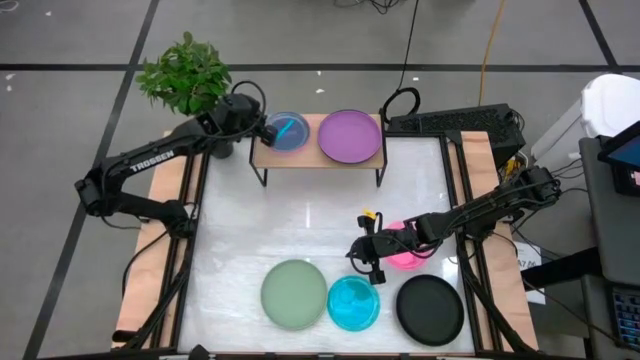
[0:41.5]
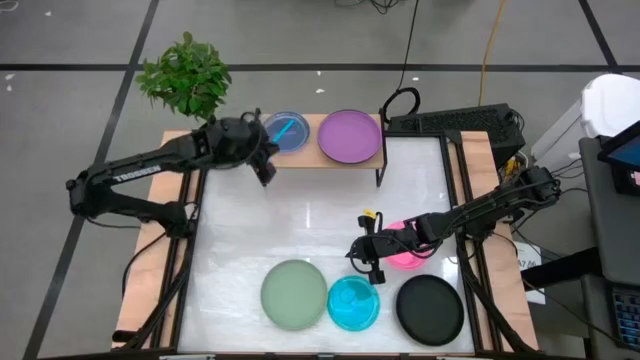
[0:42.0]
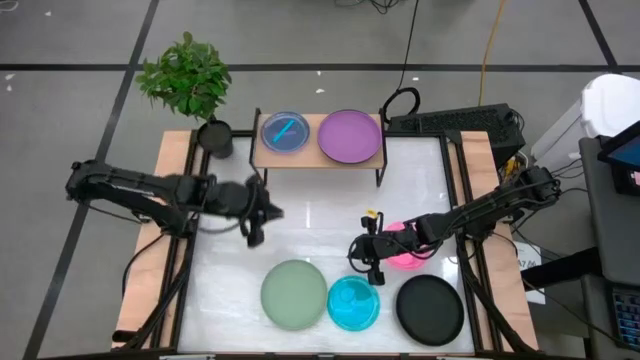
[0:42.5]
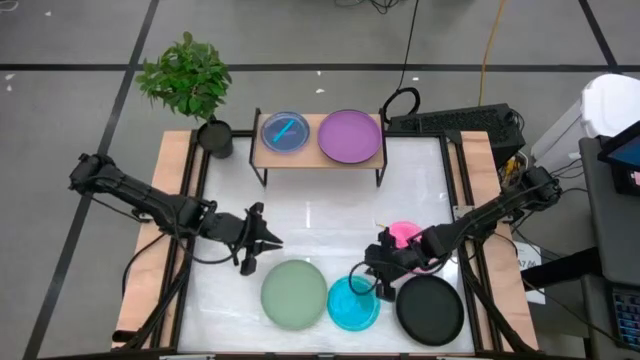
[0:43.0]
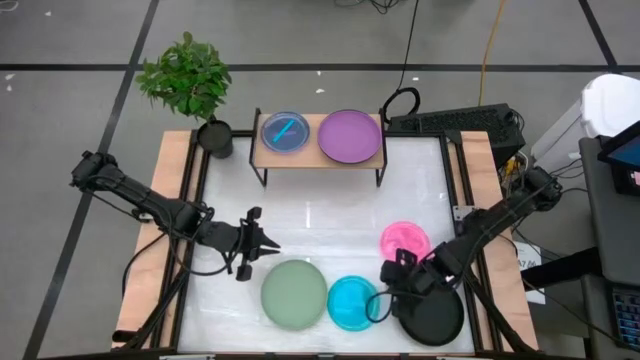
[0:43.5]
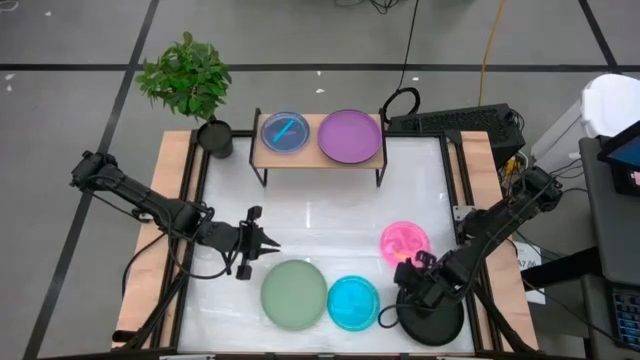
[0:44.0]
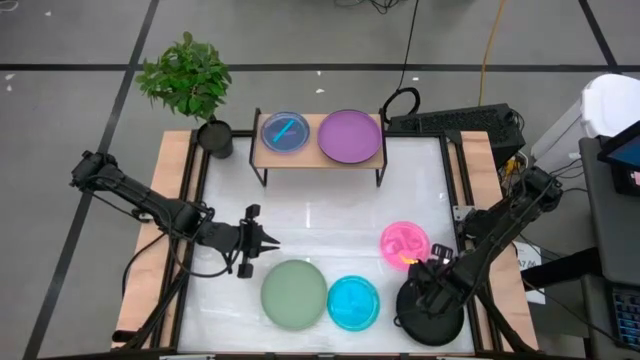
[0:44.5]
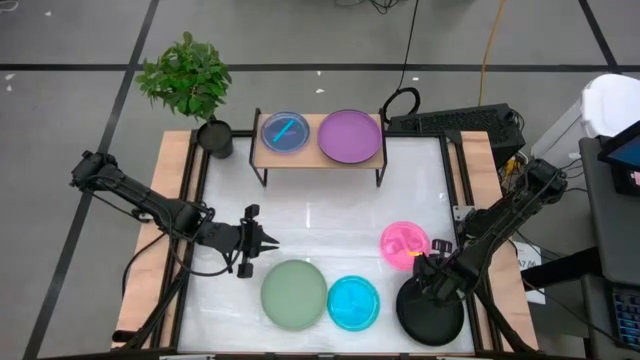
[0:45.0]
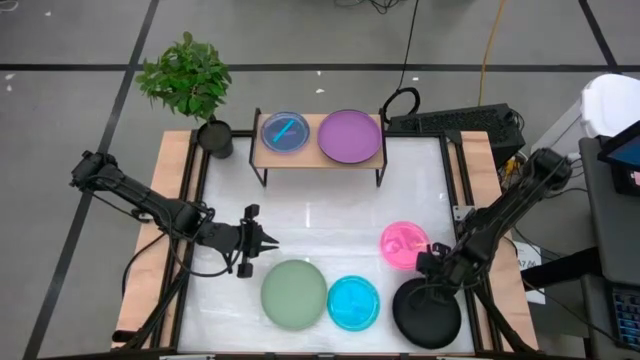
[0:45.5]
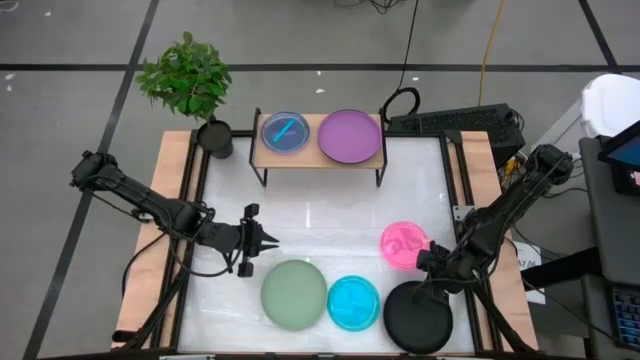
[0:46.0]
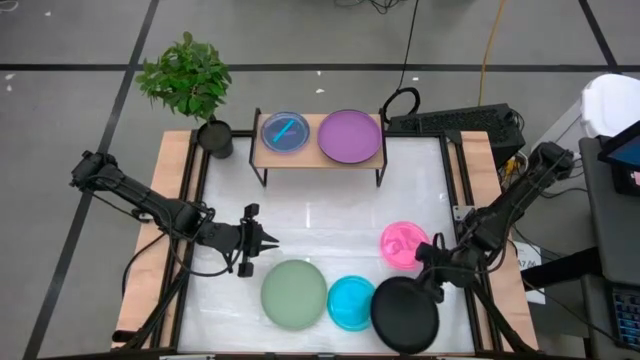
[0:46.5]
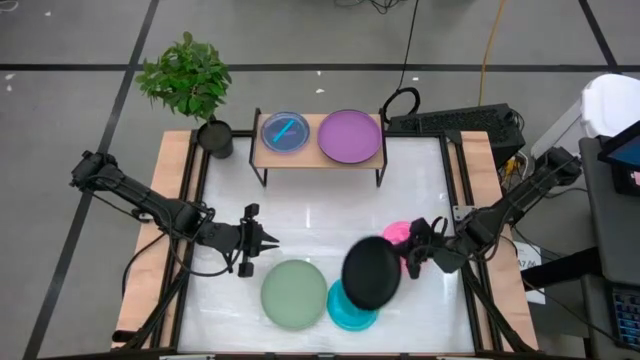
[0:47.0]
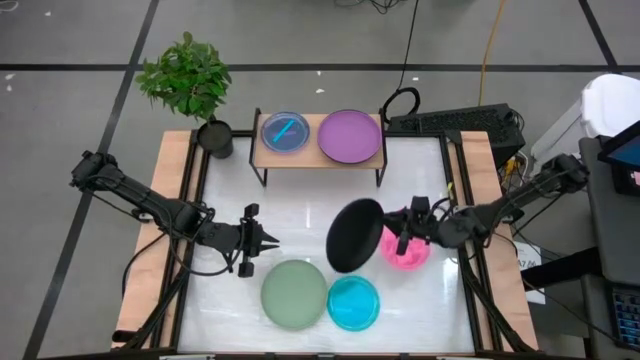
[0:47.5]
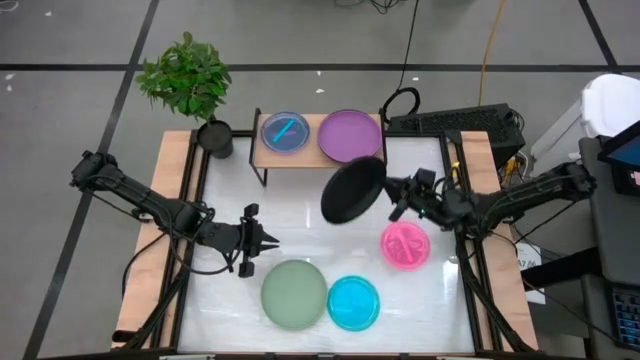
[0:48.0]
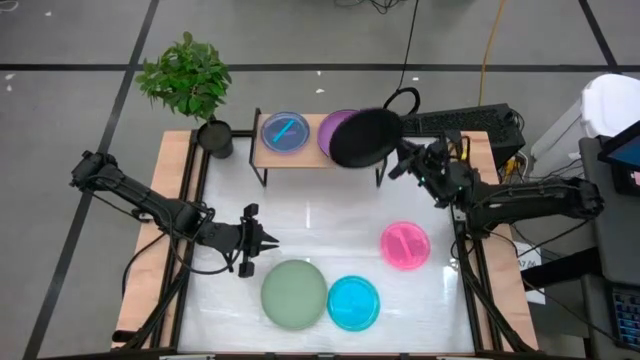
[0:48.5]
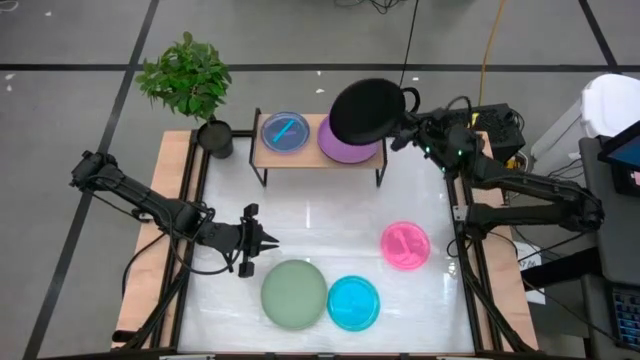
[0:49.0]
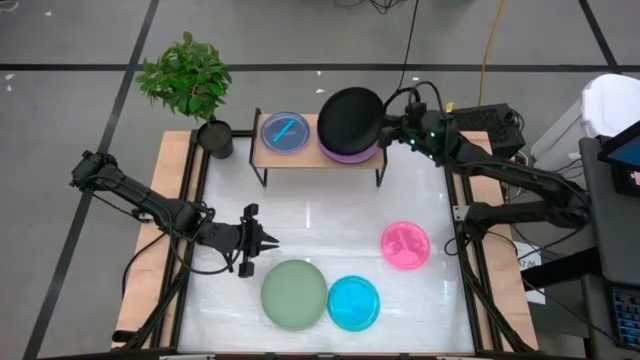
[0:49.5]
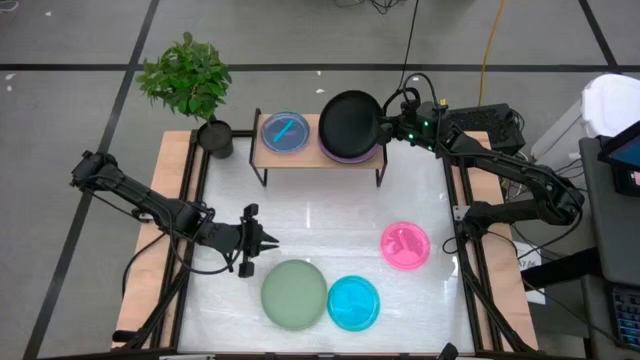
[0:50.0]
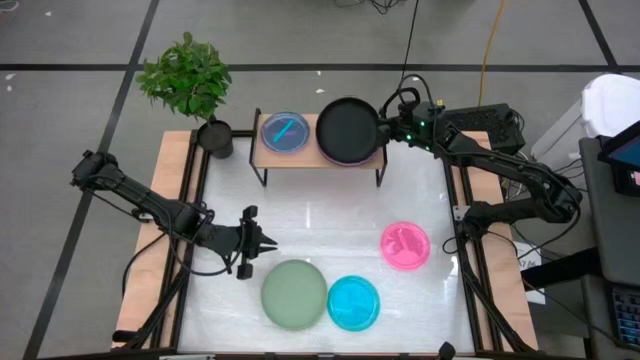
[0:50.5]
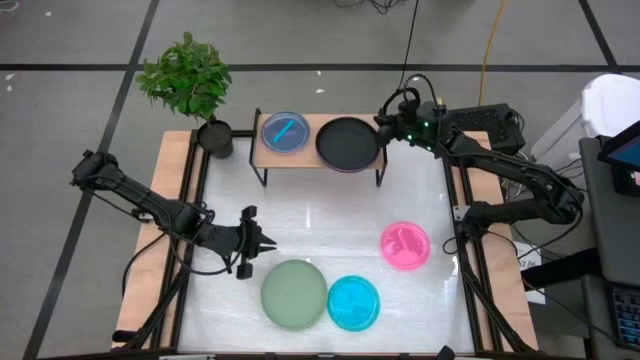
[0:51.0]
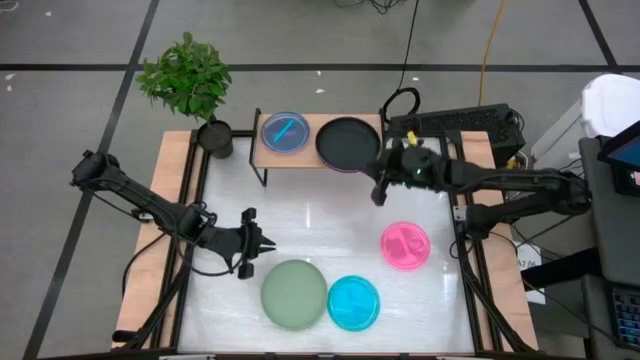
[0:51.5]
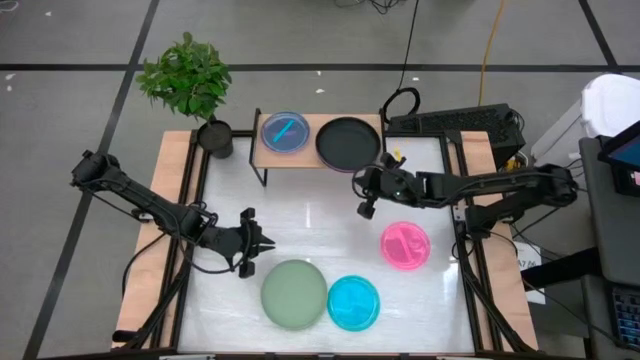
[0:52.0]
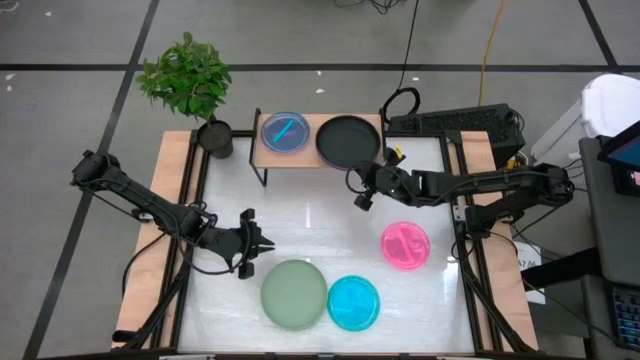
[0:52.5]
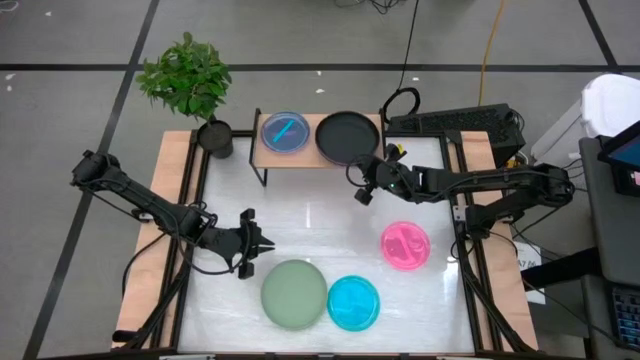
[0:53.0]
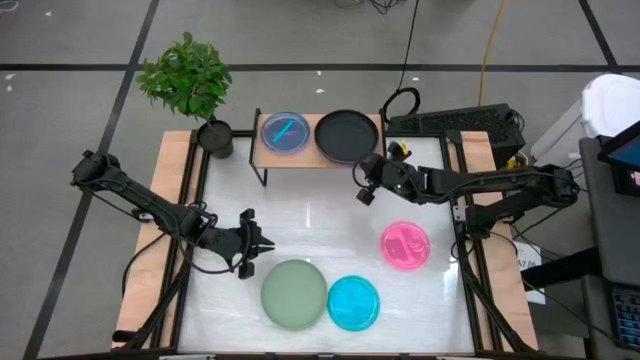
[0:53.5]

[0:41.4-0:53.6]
Task: Place and stack plates onto a shelf
Stack the black plate on top of the violet plate on the shelf

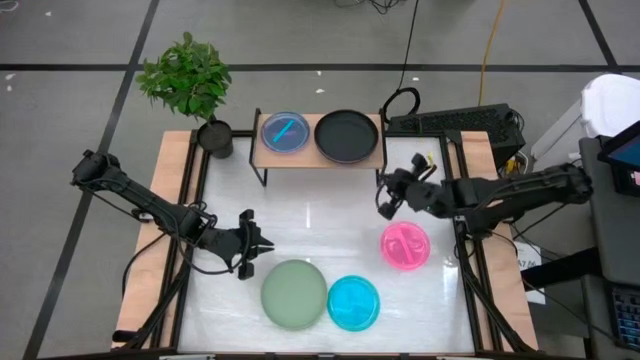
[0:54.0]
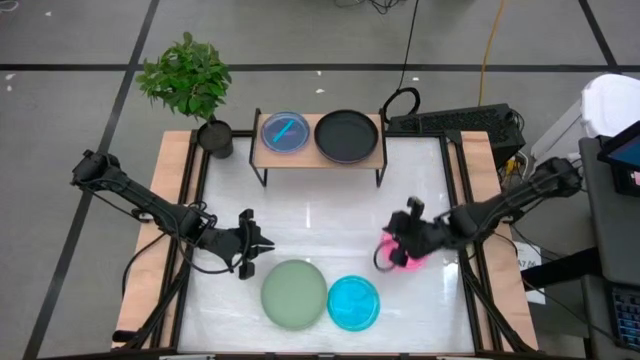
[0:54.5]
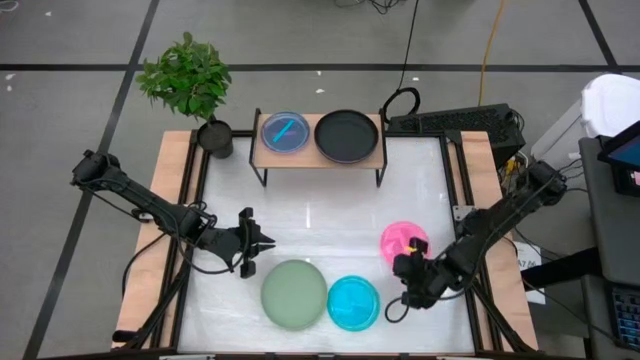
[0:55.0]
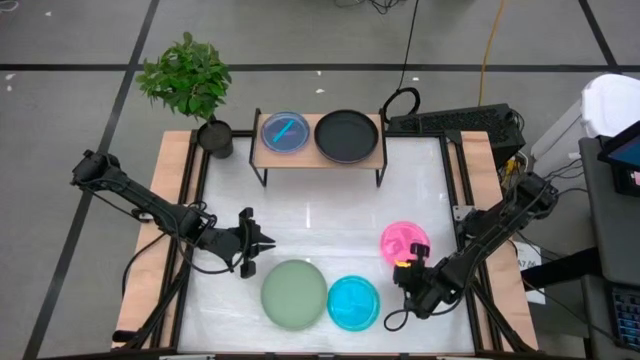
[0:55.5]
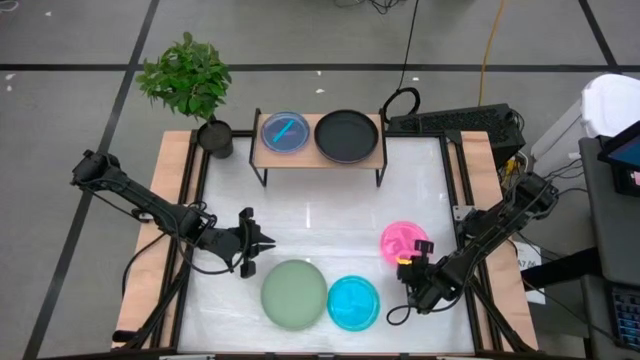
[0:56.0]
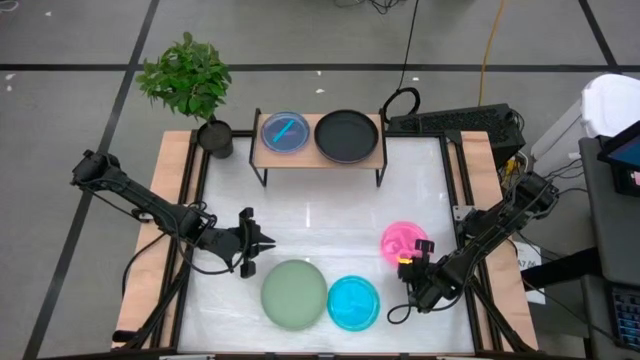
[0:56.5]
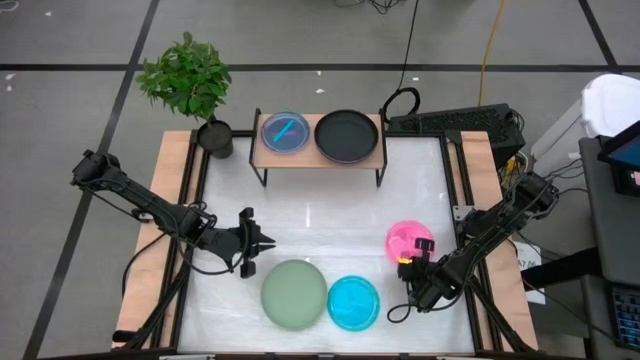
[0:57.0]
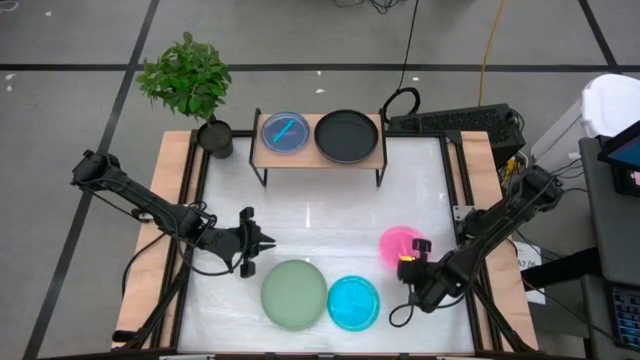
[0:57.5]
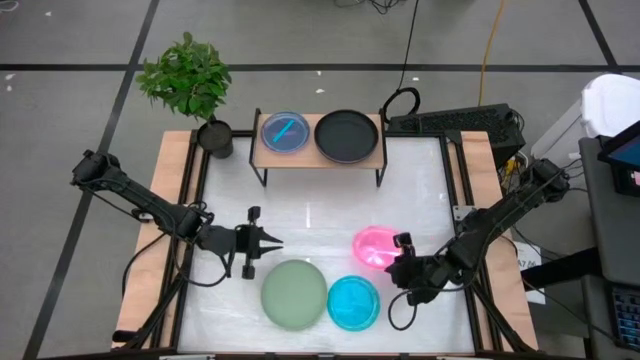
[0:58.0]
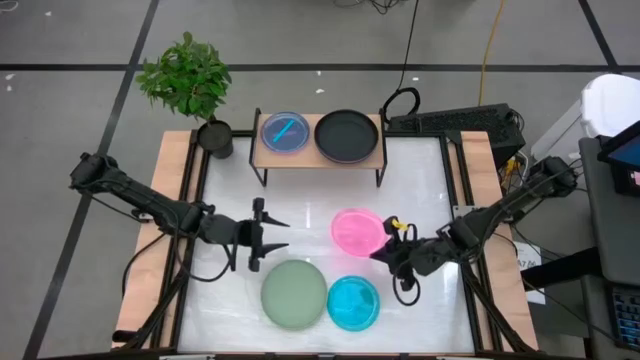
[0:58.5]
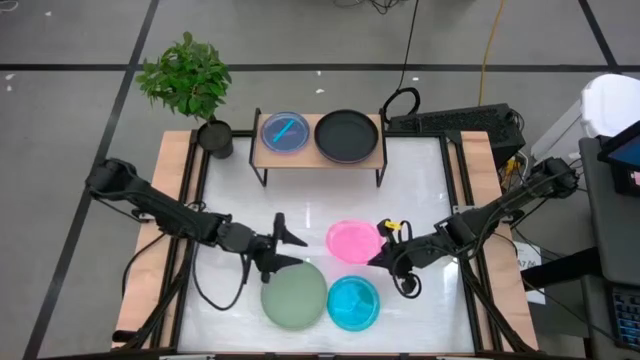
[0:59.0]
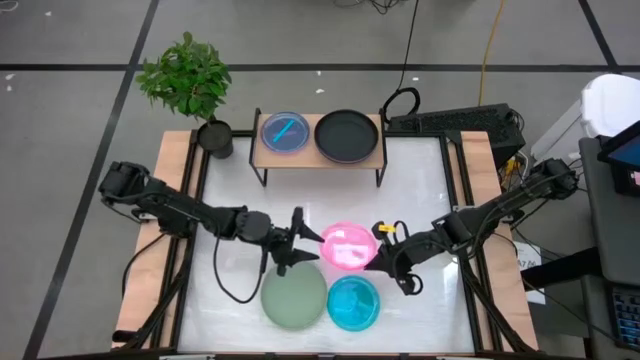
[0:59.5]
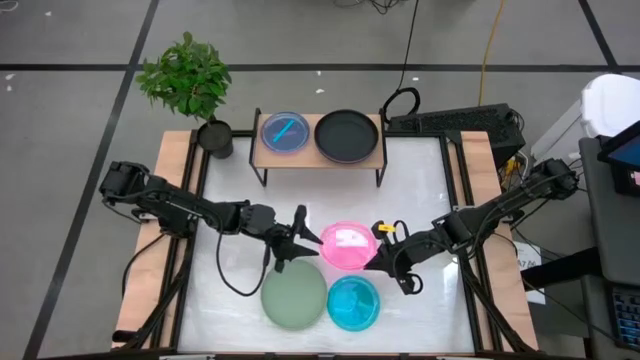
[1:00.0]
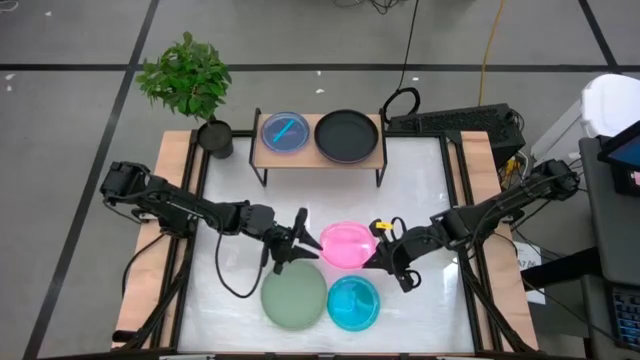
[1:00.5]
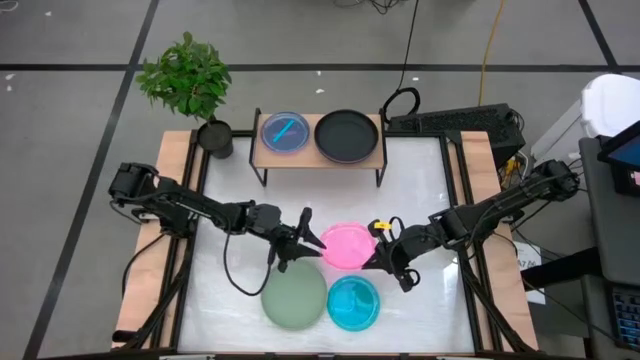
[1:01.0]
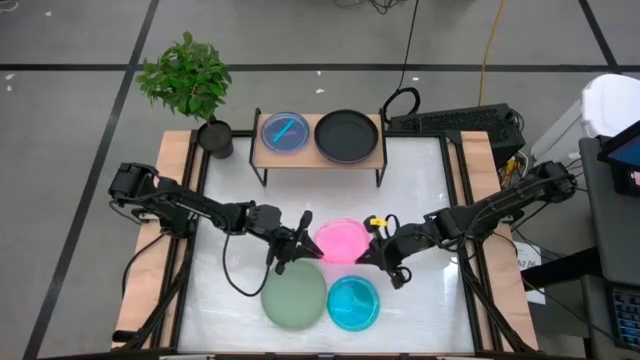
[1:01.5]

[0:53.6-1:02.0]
Stack the pink plate on top of the blue plate on the shelf

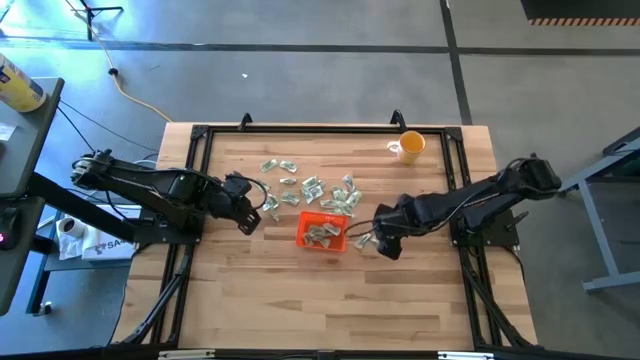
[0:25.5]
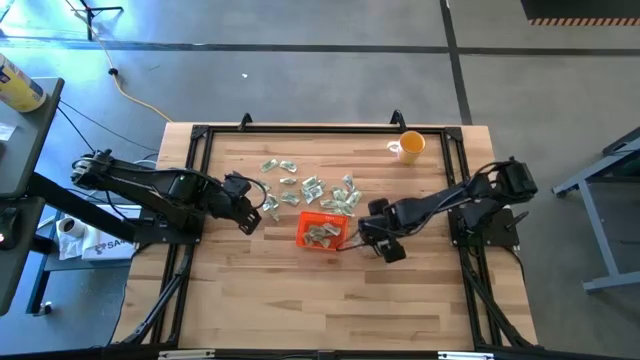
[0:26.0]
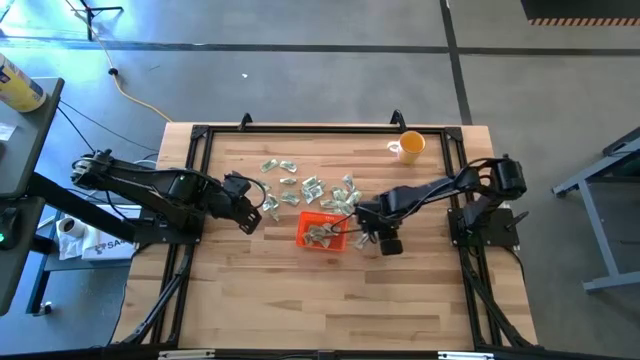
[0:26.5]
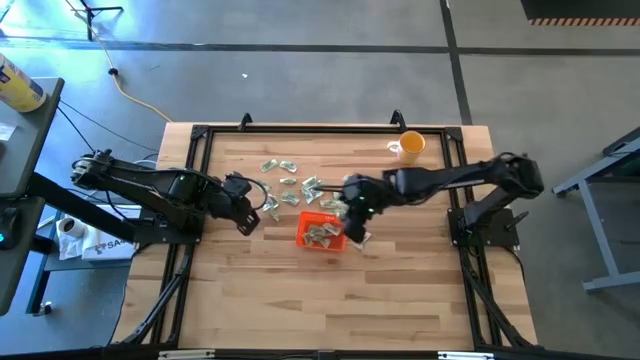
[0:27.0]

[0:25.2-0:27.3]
Task: Pick and place Stevia / Truvia into bins
Put the stevia packet into the orange bin
